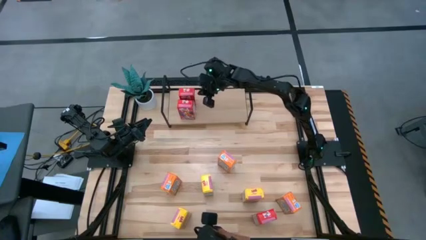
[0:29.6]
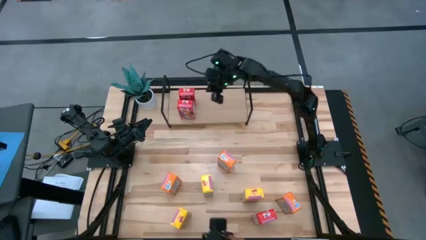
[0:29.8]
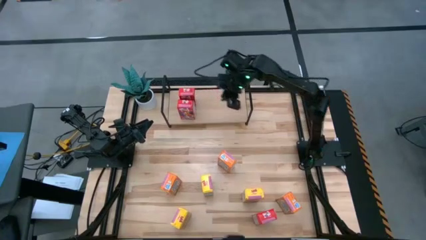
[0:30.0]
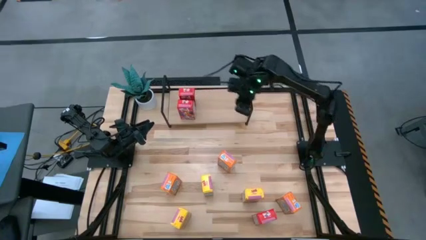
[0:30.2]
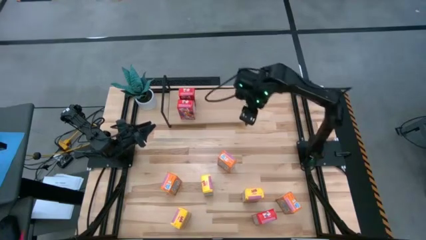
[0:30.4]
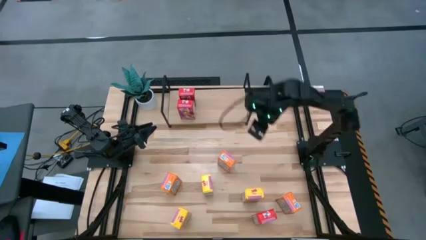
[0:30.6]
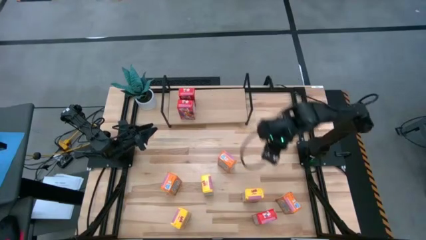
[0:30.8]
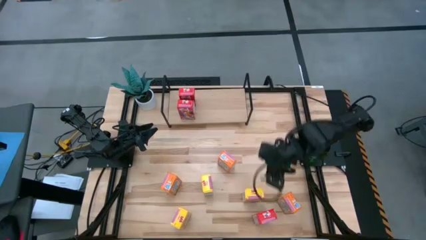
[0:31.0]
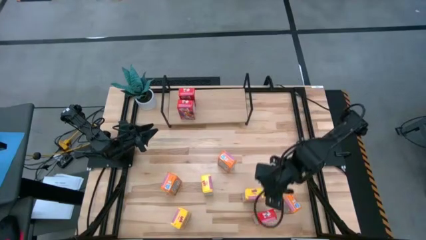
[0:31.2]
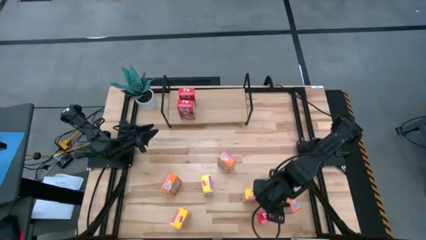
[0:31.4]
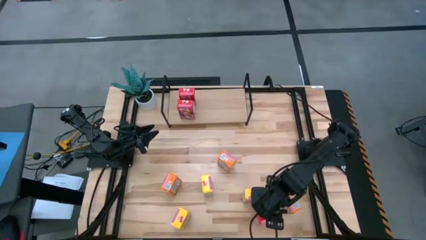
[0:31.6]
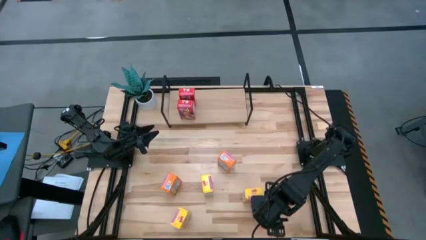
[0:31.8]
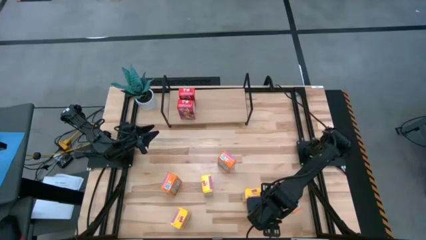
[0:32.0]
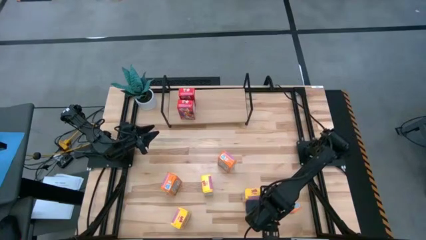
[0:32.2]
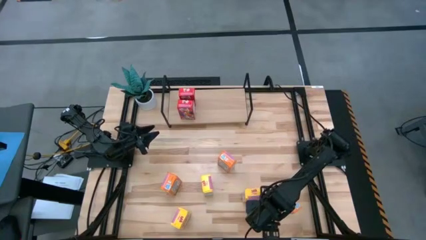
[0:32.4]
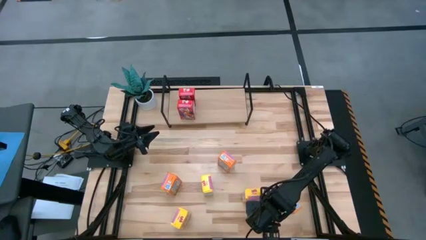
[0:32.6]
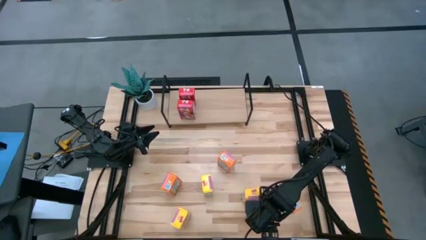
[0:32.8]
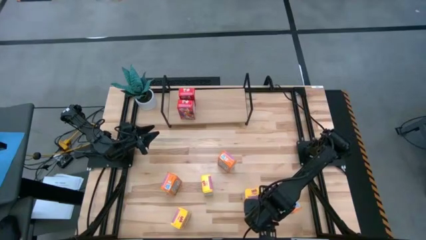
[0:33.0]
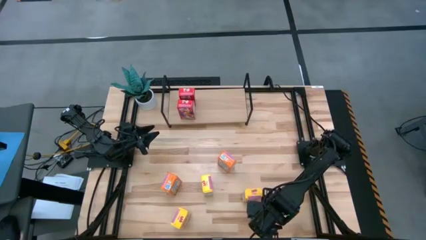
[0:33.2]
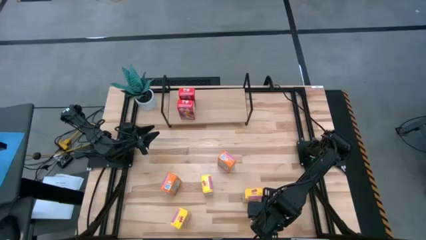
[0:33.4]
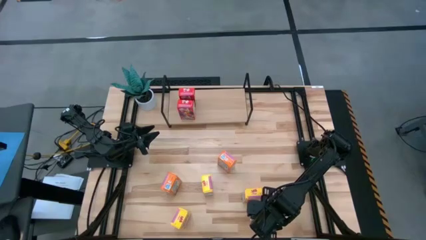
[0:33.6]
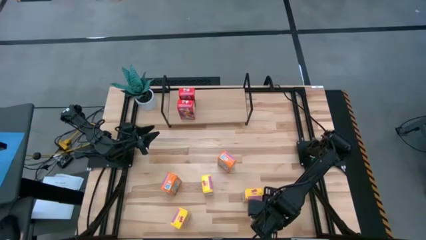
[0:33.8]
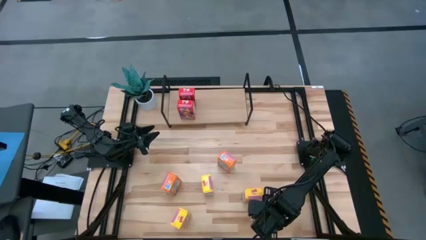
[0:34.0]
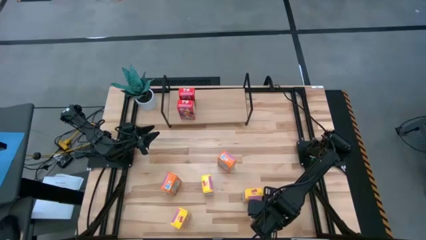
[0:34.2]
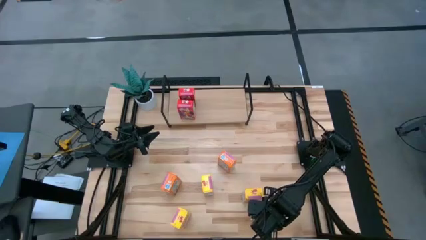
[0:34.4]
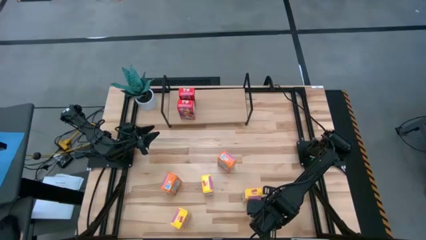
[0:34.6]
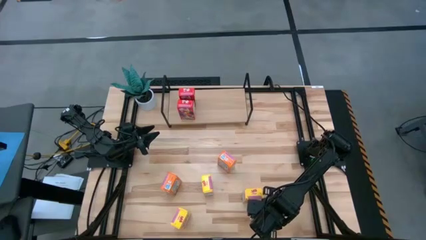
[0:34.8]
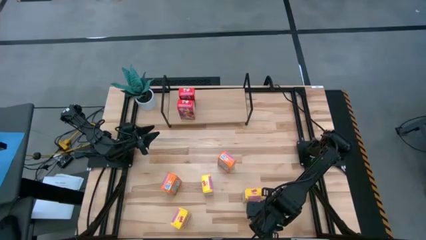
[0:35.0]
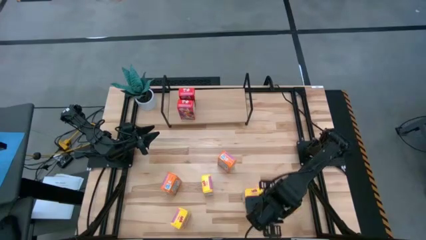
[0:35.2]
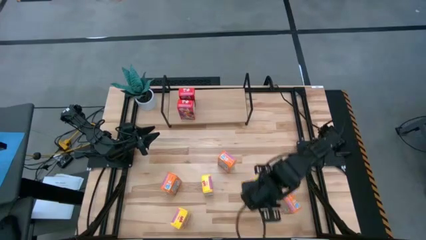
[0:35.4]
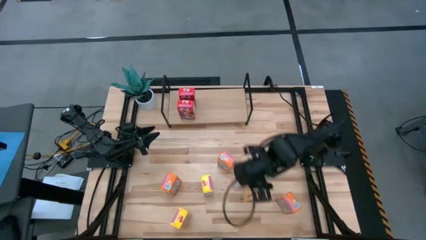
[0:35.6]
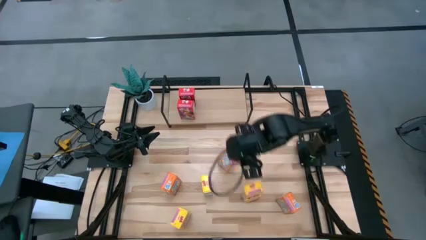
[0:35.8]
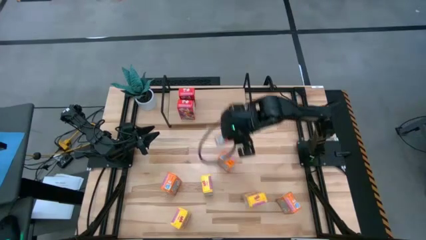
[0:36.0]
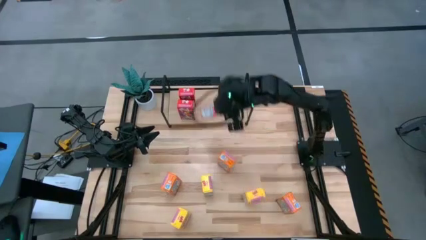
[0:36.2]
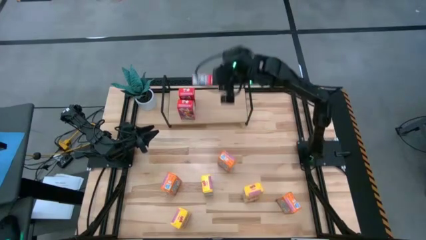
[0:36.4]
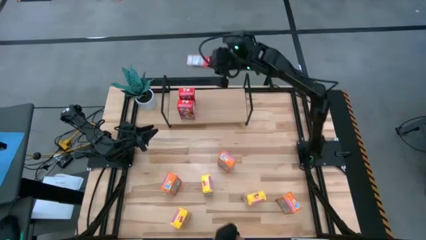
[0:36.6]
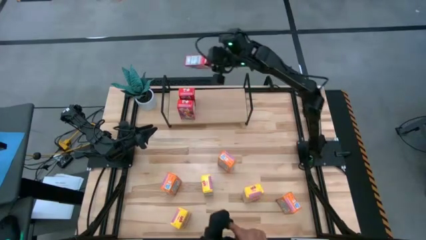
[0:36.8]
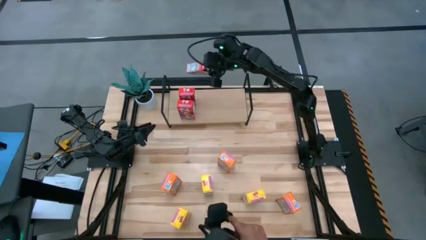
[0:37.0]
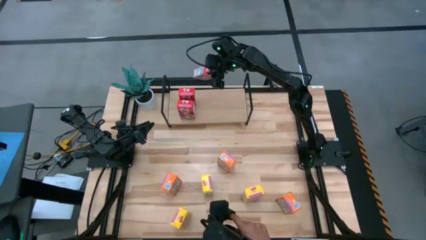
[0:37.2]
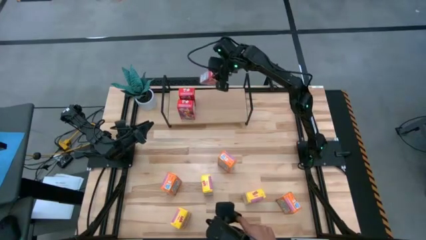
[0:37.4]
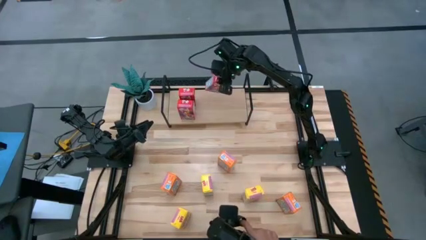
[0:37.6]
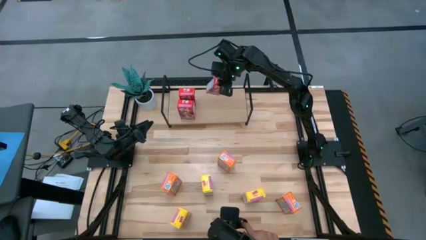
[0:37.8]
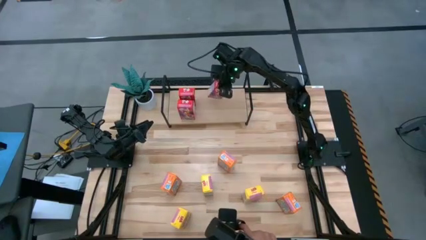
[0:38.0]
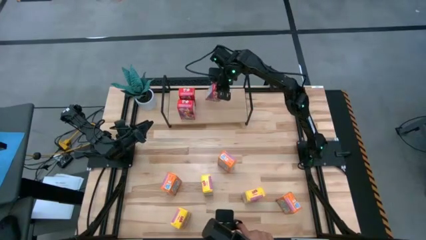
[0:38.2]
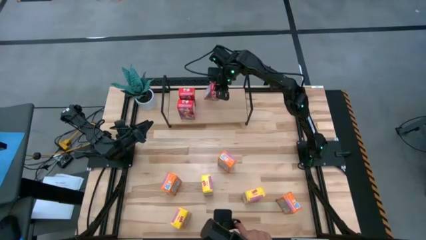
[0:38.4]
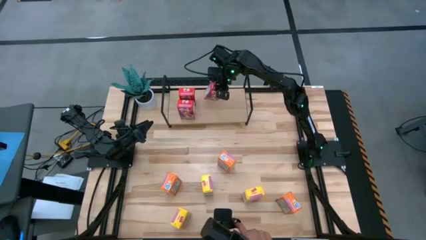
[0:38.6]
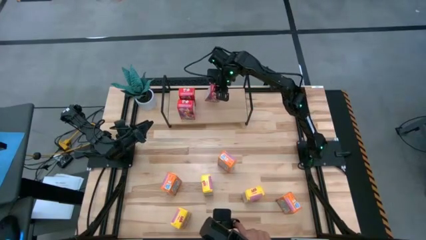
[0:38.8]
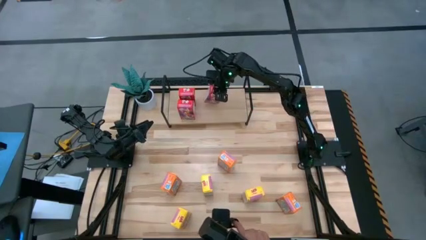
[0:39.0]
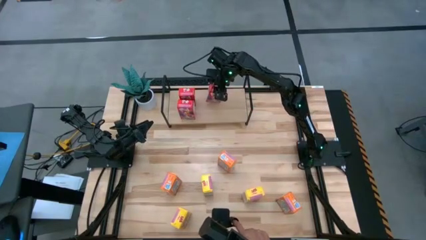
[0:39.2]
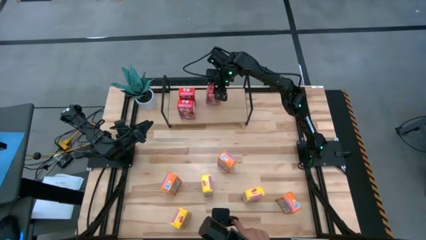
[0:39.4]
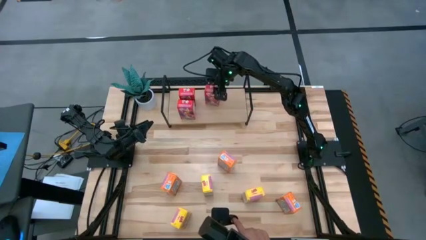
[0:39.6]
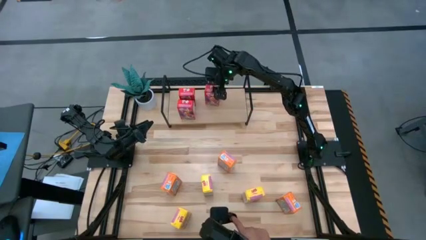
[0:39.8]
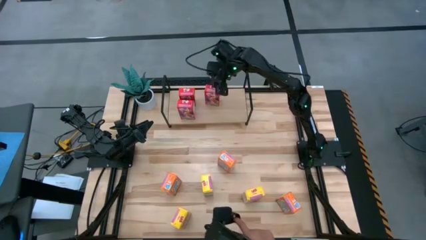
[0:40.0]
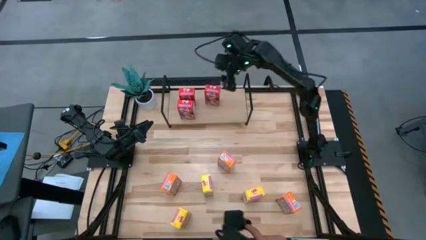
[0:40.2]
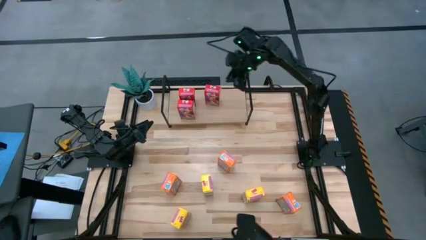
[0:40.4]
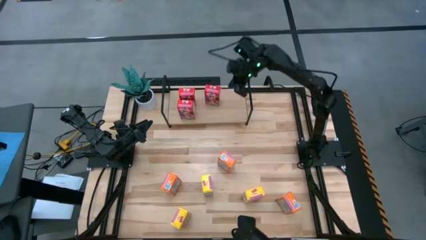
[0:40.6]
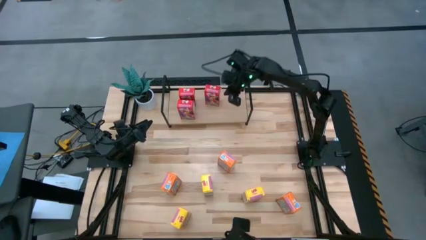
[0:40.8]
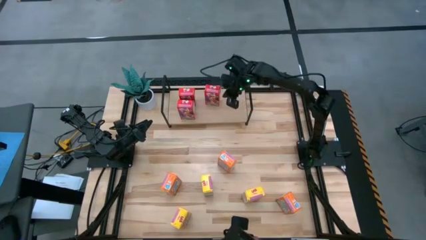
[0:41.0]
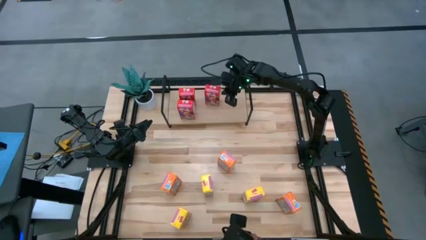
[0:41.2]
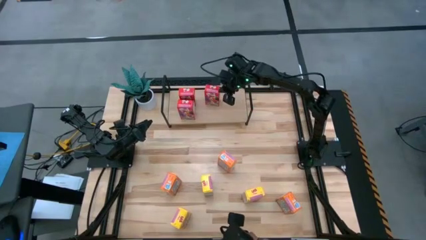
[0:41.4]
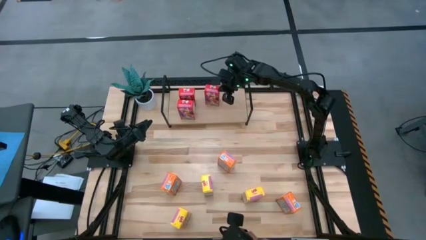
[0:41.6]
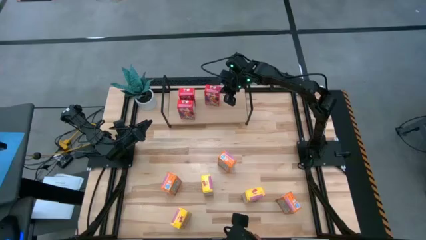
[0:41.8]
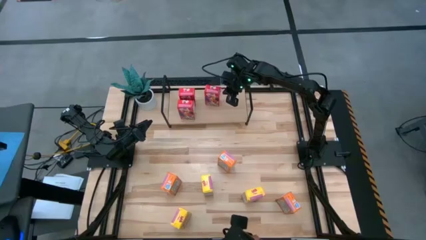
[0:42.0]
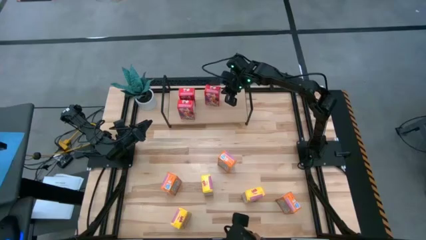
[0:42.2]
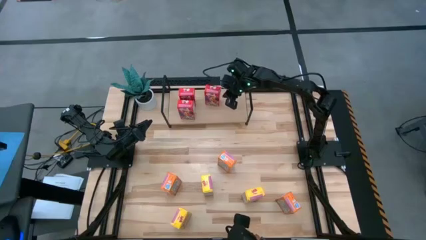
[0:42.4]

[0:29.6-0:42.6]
Task: Stack cereal on shelf
Put the red cereal box on the shelf aligned with the other red cereal boxes
